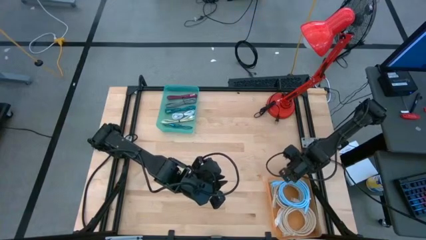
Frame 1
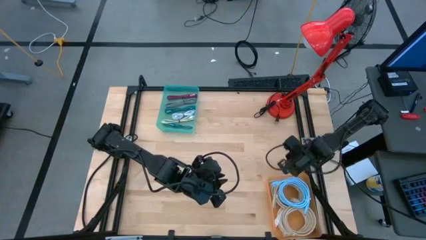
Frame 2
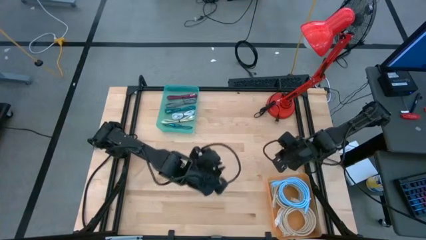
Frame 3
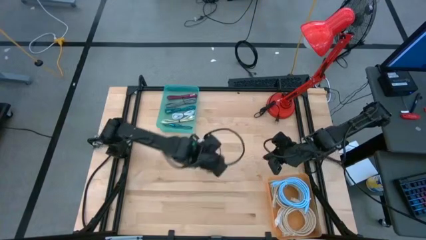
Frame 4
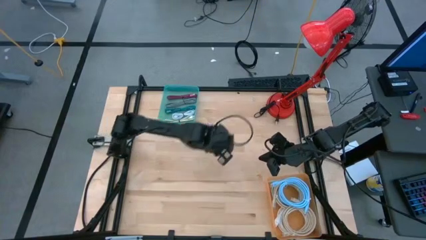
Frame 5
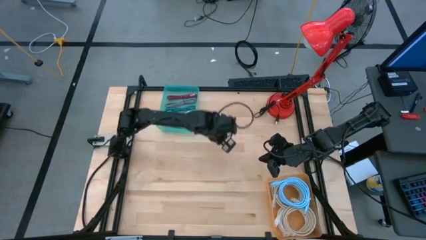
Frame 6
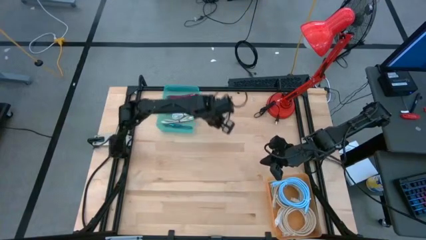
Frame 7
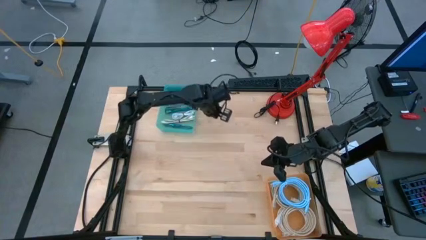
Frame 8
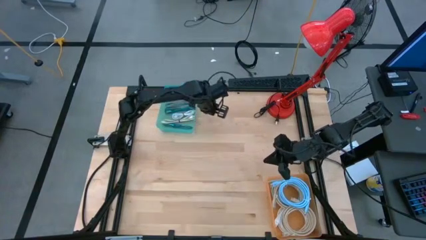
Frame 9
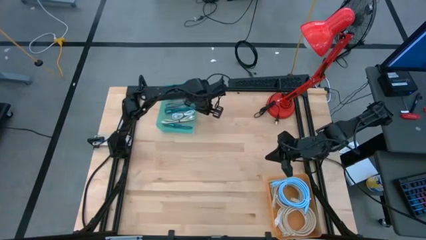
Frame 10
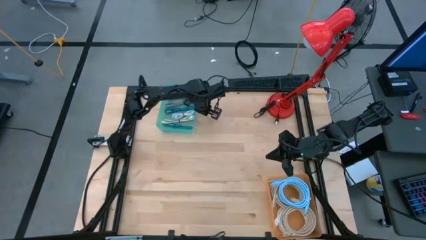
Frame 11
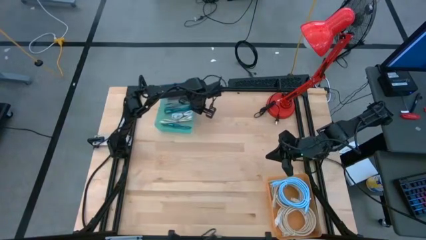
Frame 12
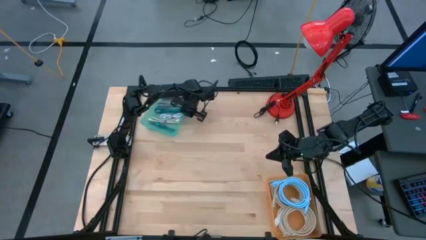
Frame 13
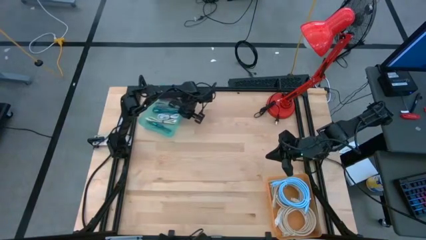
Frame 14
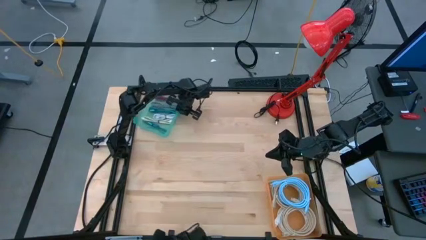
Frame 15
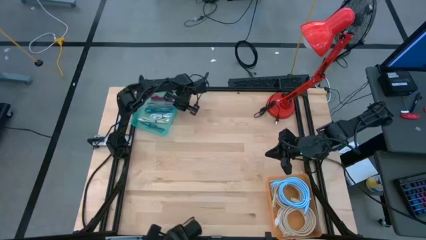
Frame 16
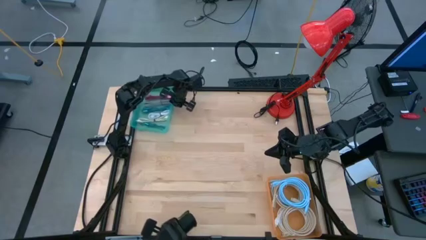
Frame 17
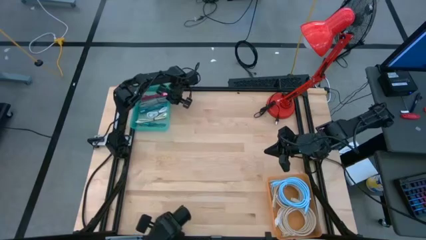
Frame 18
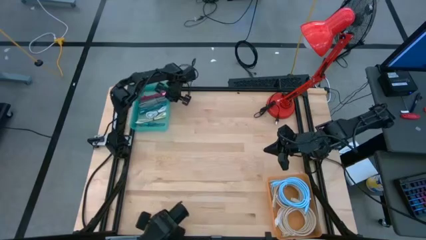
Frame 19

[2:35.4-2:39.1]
Task: Pick & Place USB Port
Adjust the blue bin

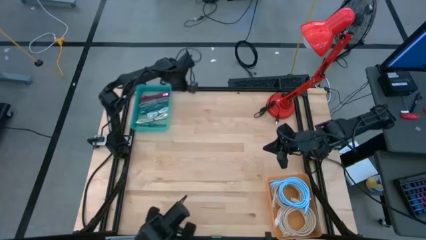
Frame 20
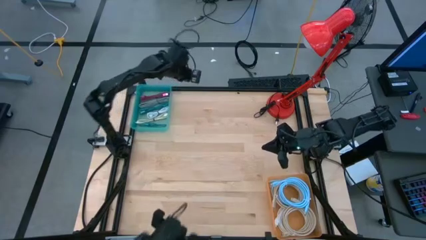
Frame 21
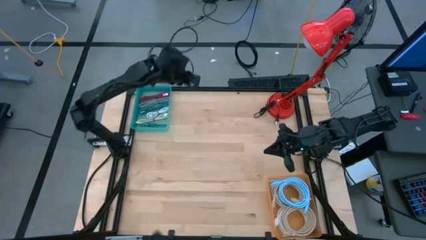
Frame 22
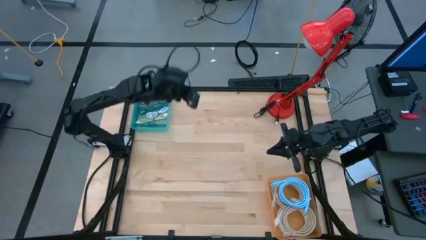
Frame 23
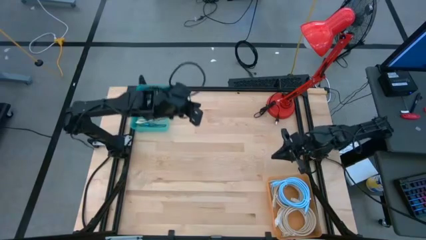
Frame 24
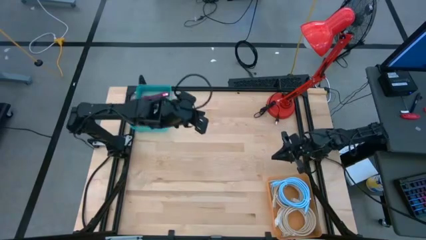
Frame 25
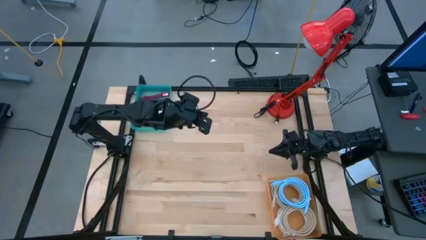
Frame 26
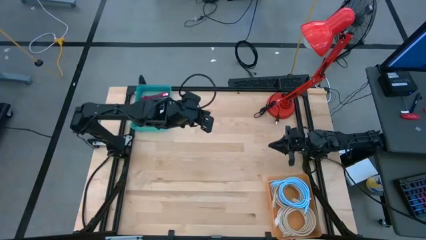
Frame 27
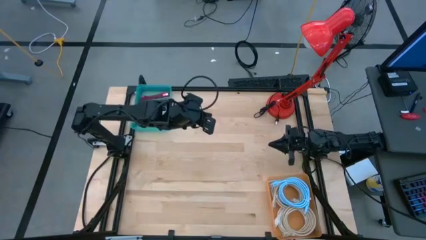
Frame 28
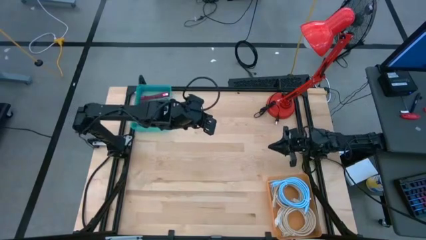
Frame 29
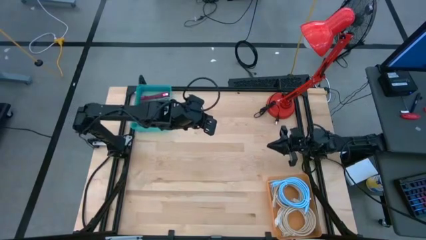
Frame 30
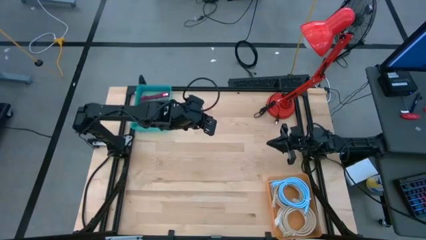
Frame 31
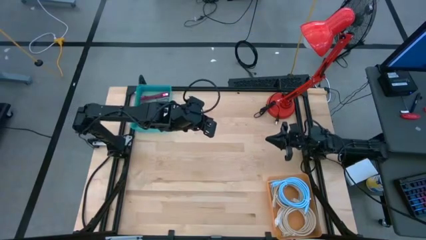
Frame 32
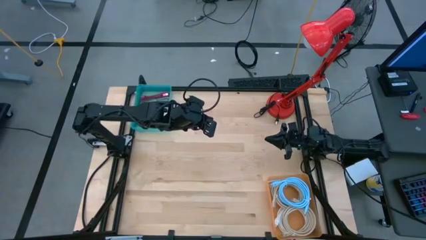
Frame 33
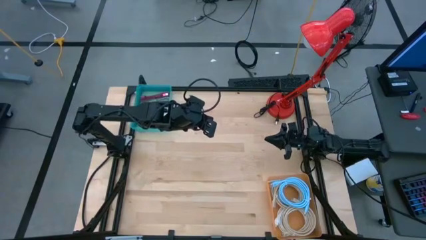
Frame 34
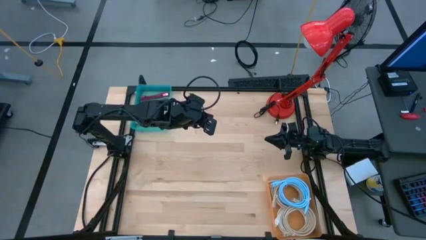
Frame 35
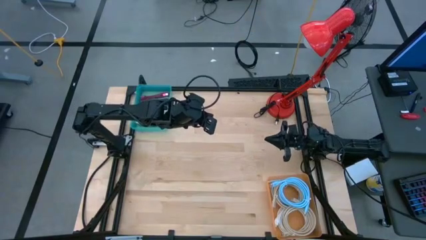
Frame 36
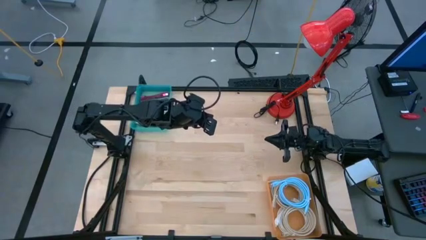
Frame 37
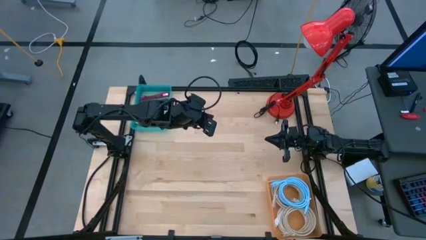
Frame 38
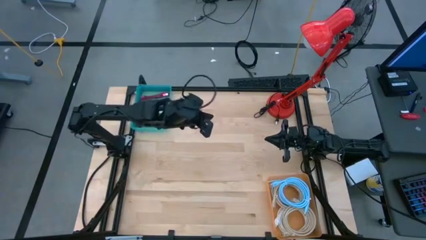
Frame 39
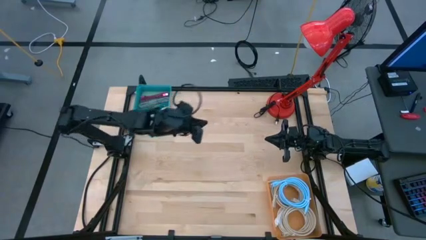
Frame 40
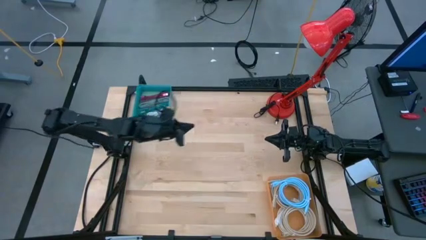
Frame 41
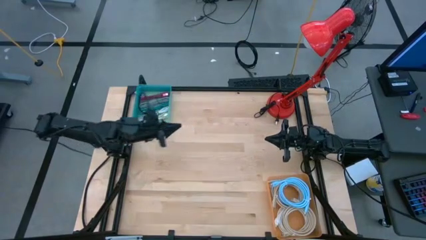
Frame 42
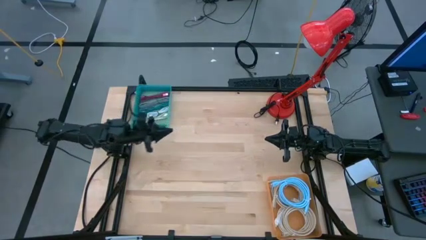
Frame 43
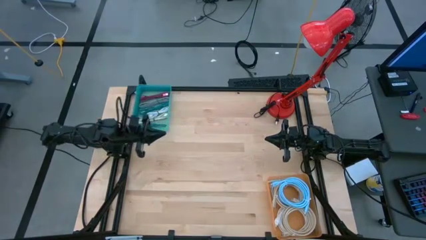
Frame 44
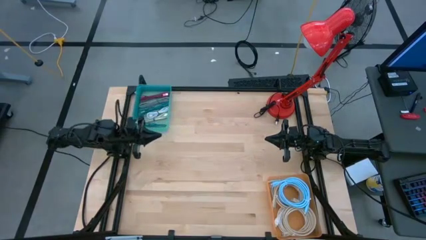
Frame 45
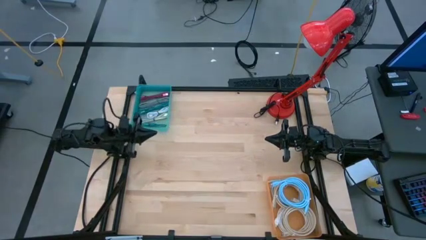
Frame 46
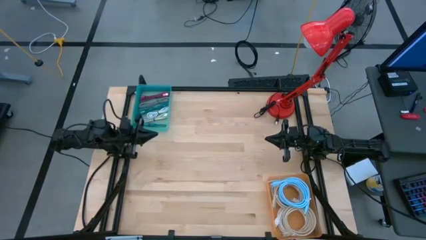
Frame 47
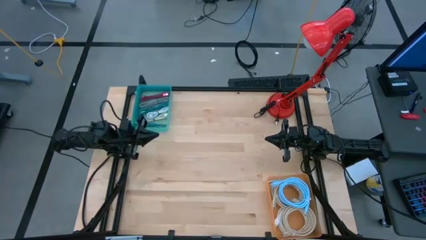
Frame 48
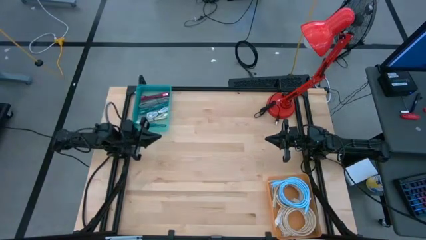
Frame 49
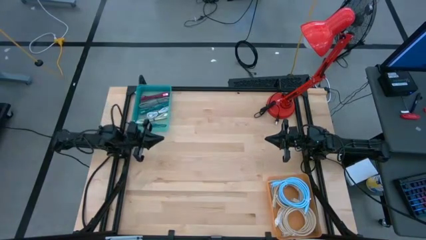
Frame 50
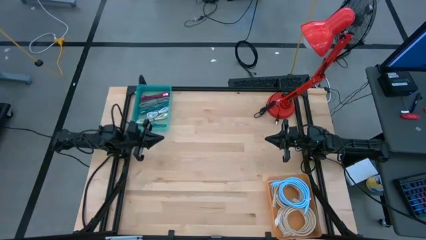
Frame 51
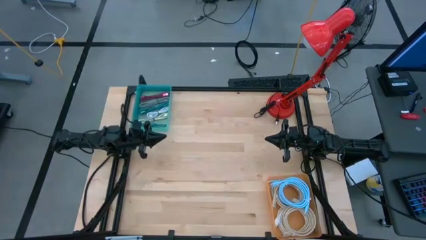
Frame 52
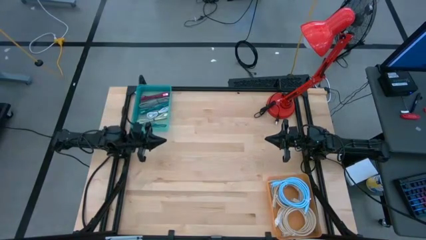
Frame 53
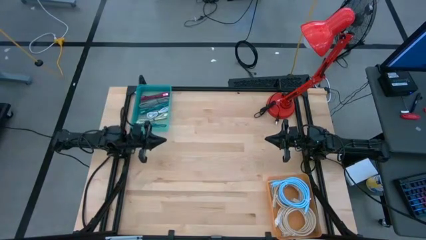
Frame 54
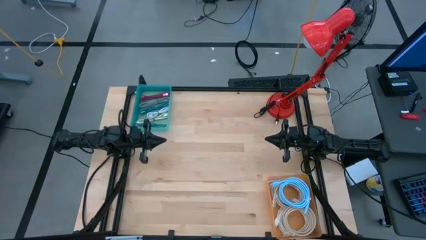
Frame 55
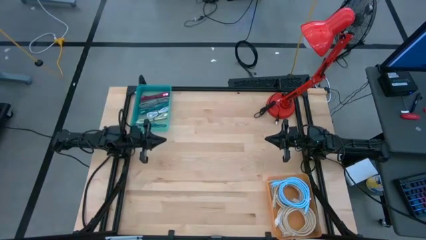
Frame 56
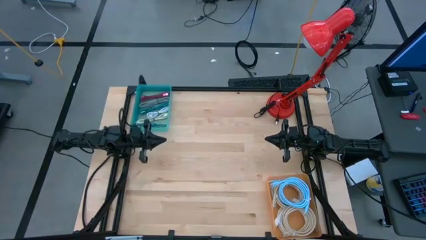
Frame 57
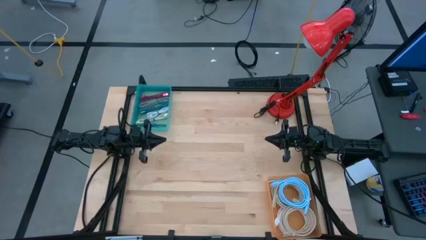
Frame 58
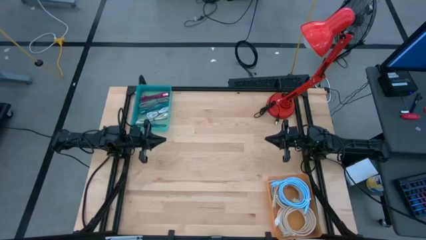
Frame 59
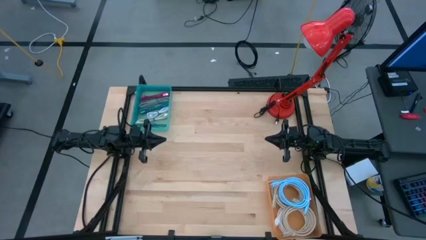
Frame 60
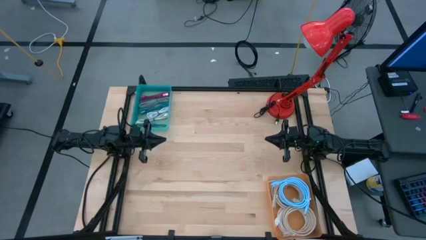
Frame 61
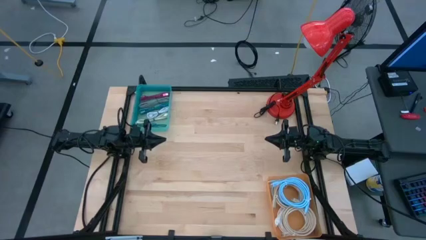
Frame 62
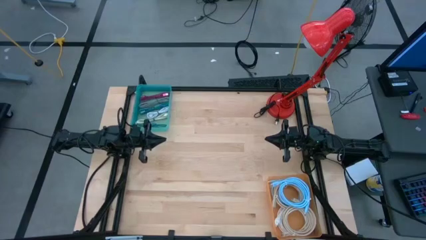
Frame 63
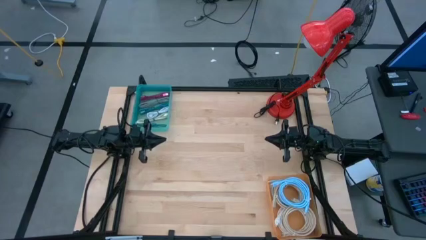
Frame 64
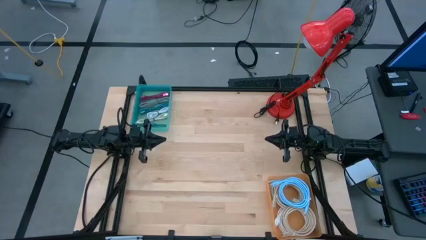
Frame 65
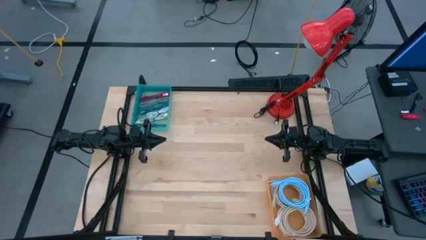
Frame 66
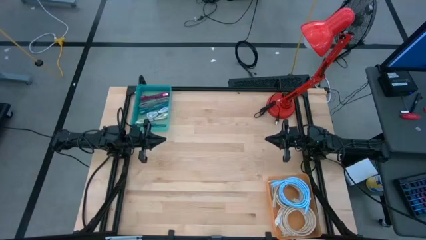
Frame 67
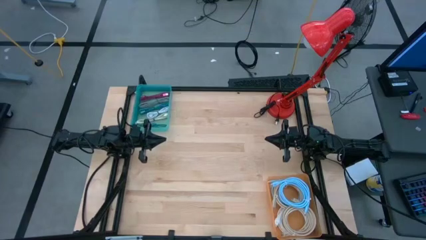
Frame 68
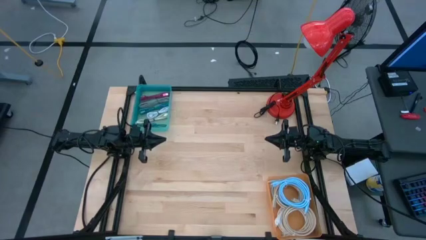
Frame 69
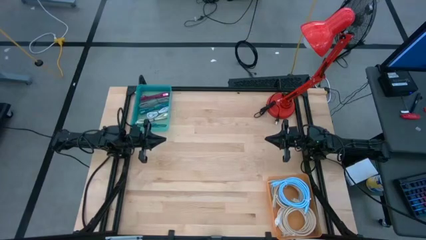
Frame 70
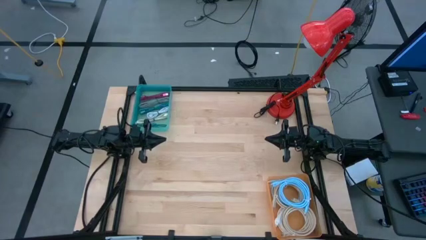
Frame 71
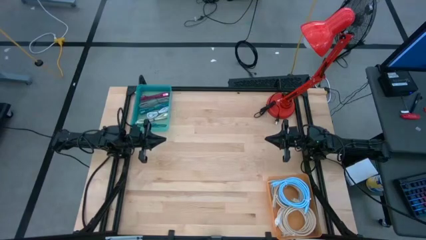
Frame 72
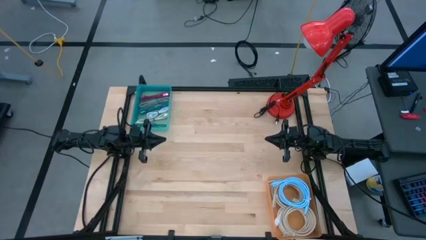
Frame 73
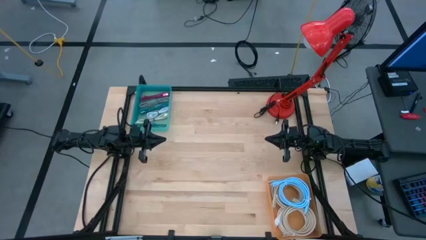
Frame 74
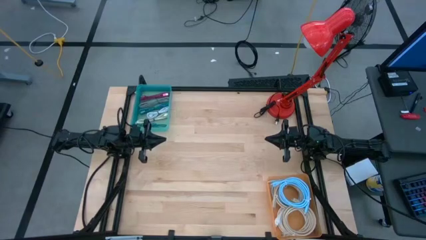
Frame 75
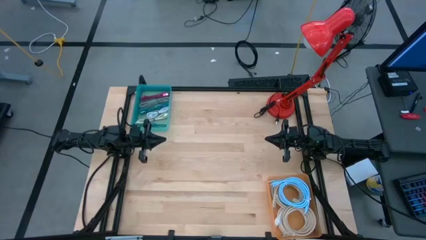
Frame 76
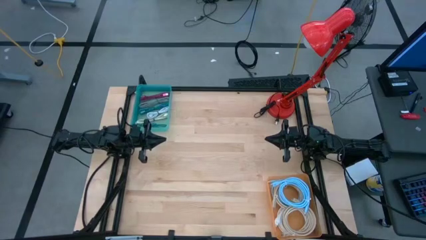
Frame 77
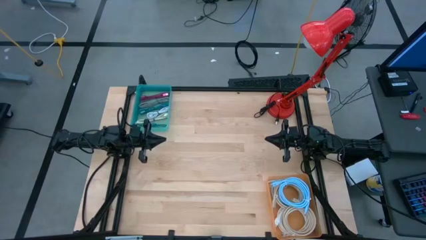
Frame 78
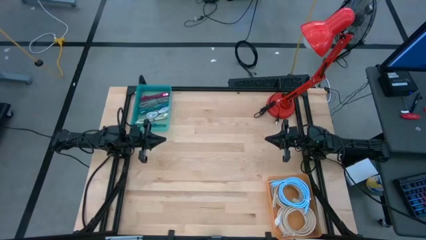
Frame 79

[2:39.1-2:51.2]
Return to Home Position

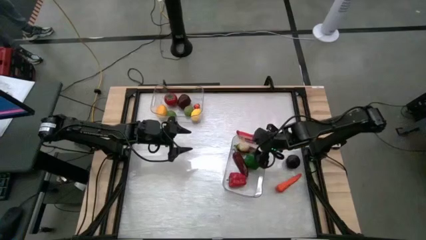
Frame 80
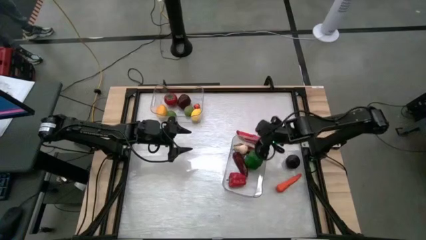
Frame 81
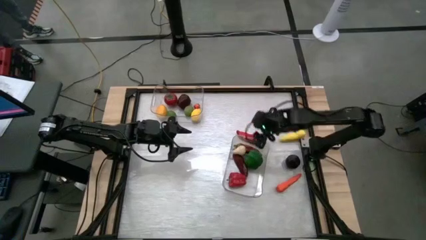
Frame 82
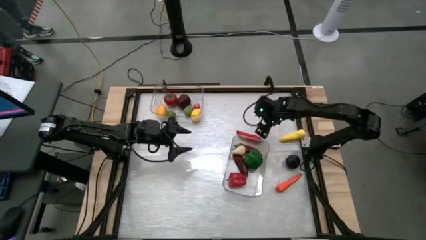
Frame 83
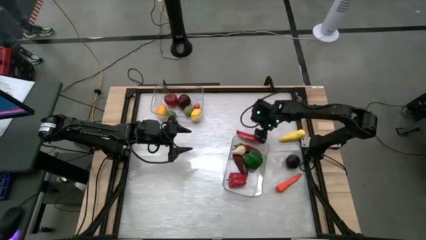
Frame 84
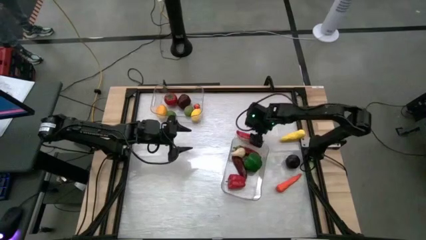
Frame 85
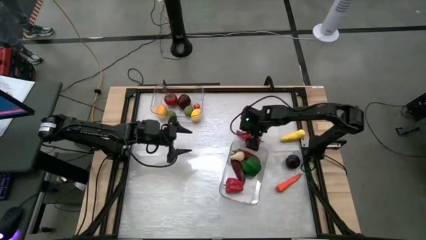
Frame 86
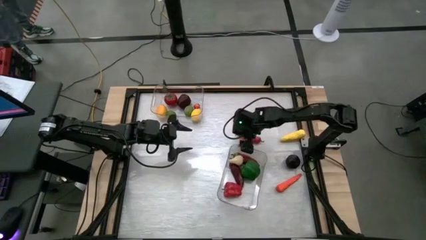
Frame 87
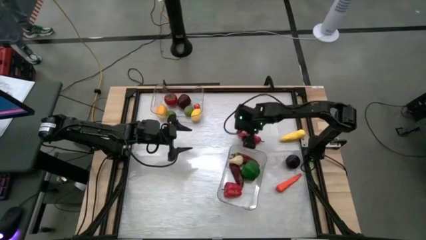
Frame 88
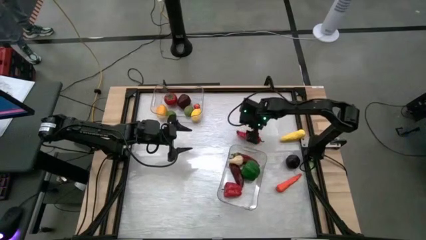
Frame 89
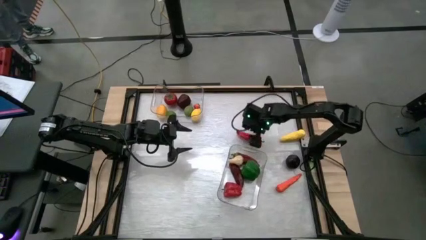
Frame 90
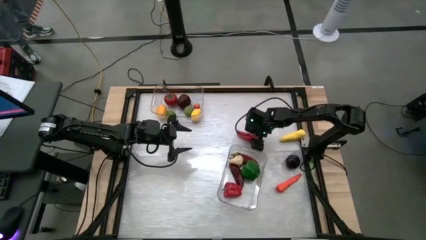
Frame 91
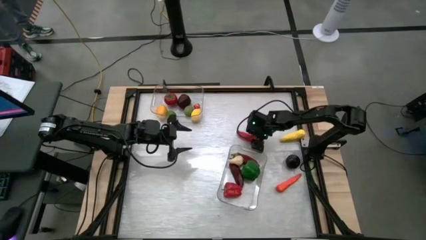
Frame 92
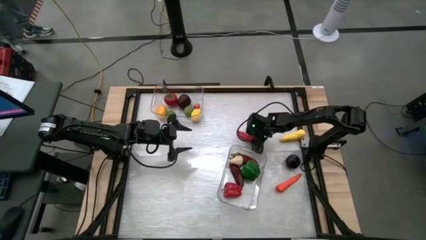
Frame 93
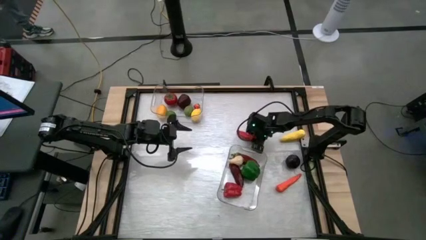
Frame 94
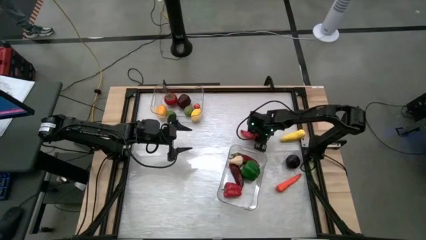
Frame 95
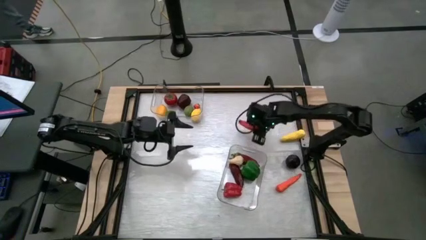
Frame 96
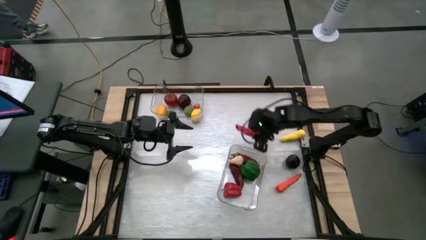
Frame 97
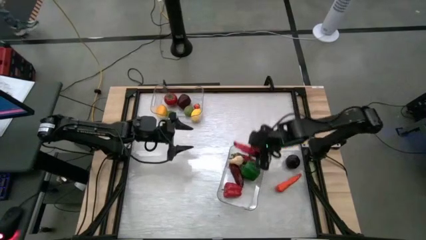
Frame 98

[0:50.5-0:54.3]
Task: Sort produce into baskets
Put the red chili pepper into the bottom transparent bin
